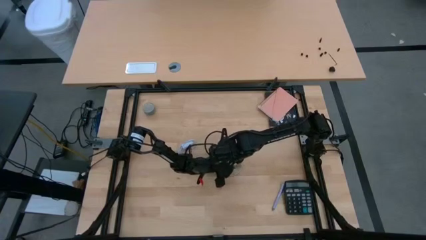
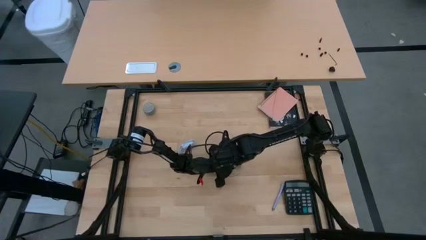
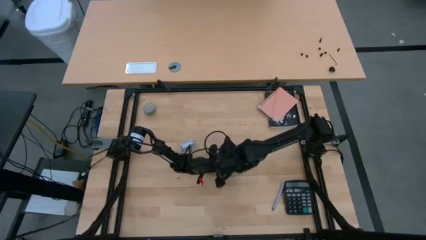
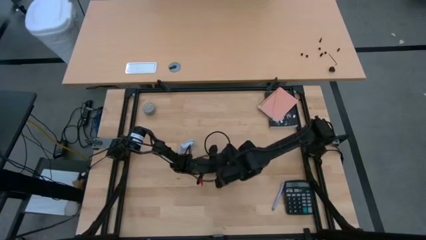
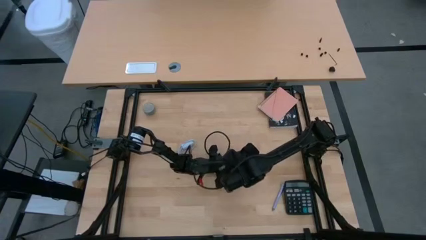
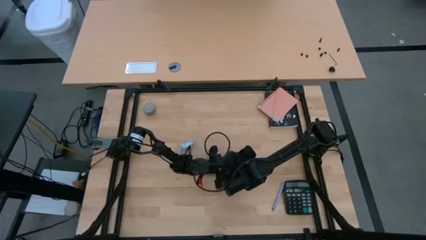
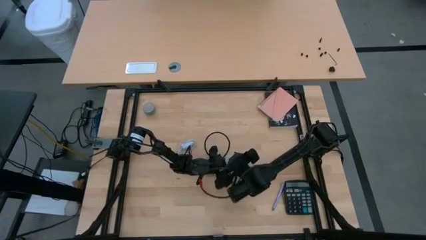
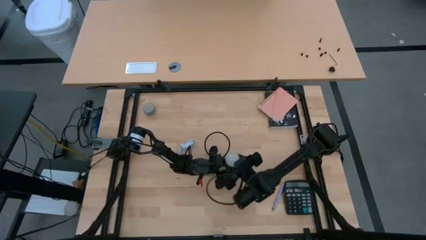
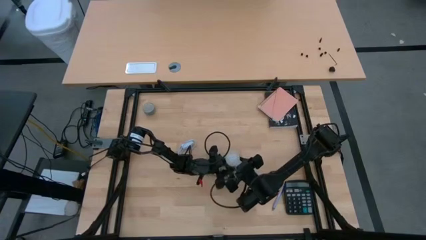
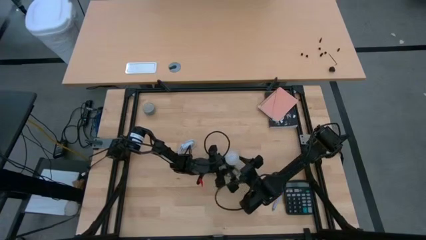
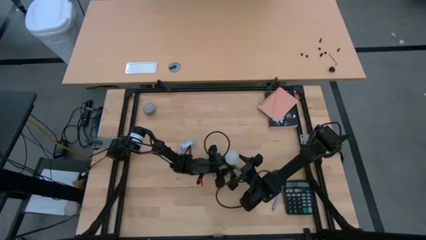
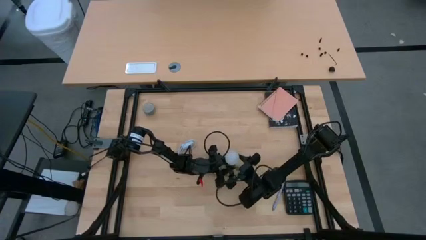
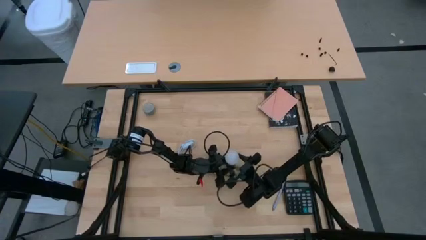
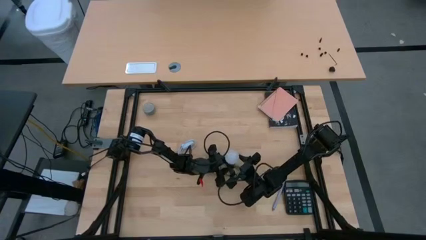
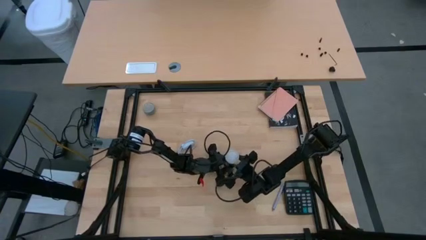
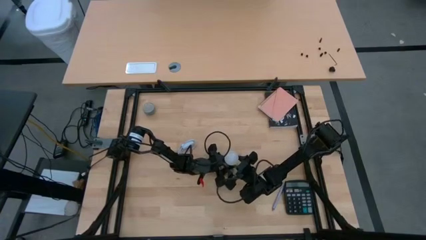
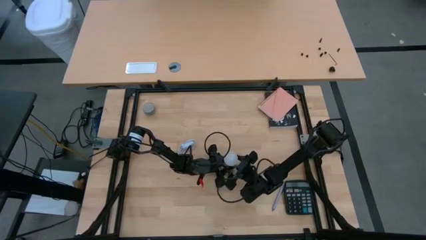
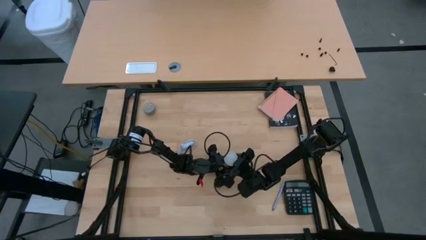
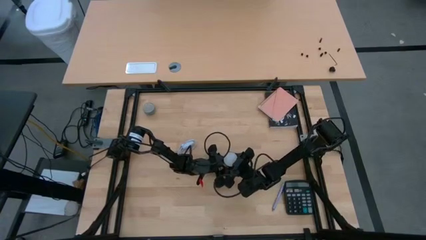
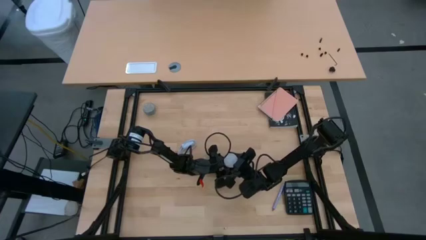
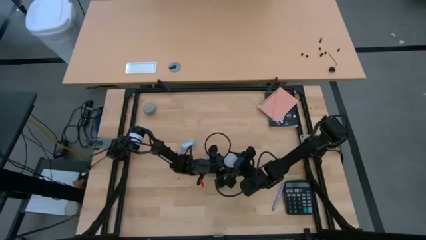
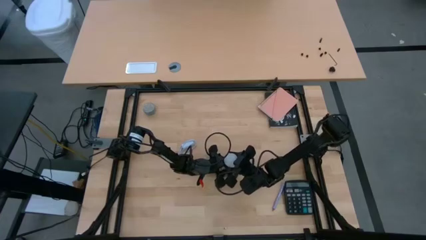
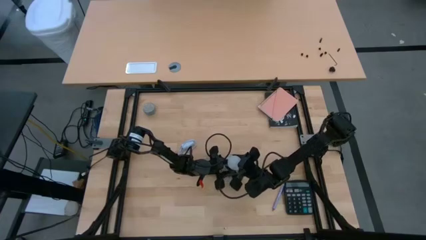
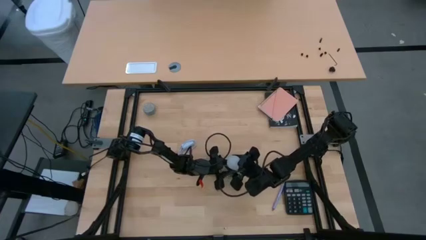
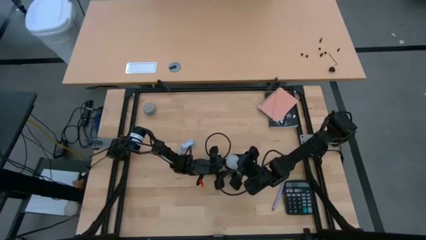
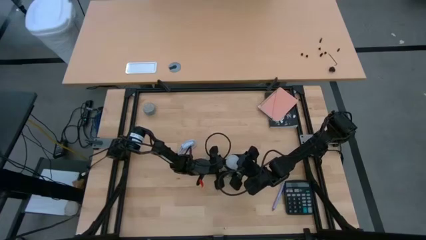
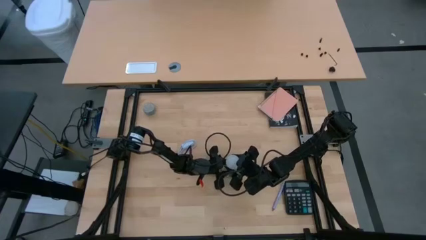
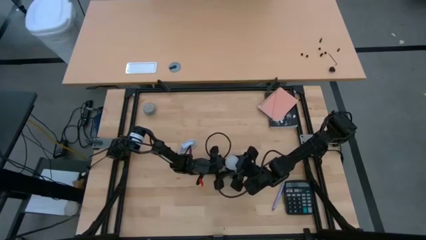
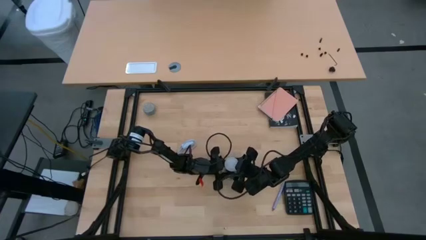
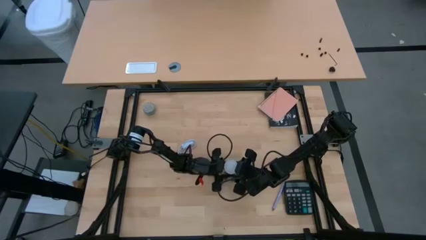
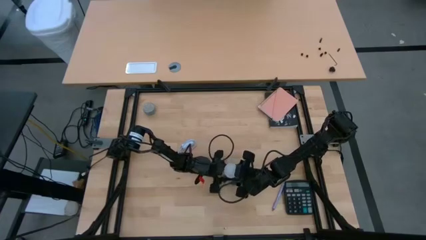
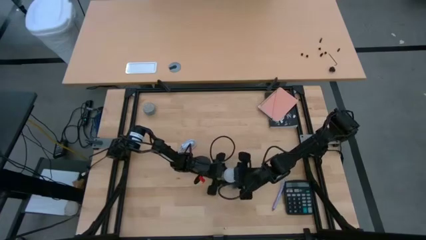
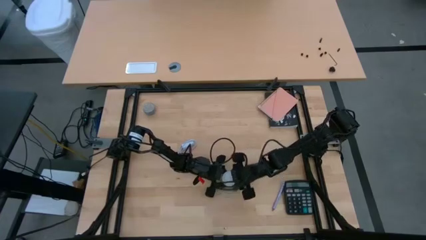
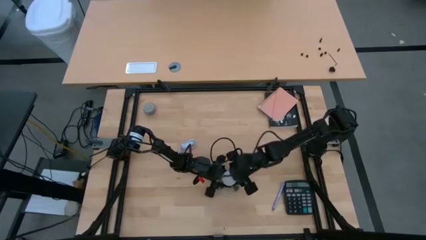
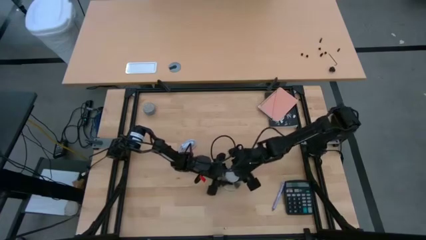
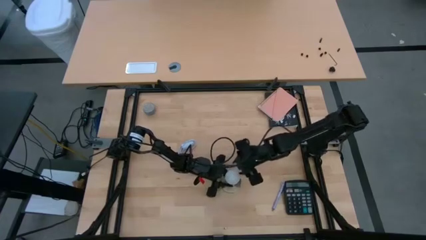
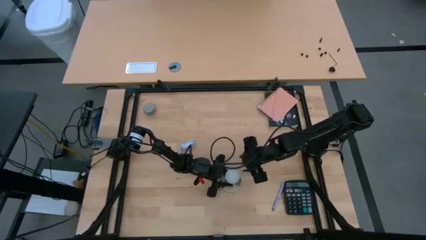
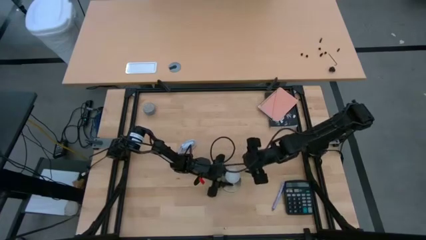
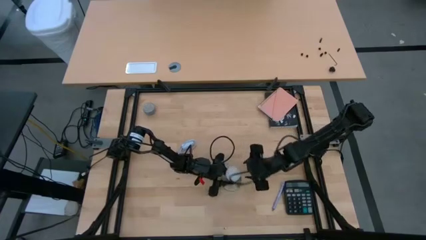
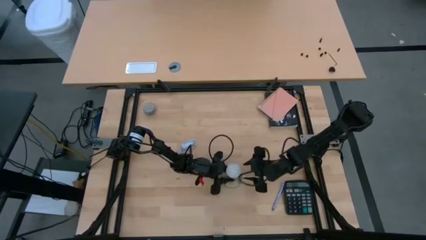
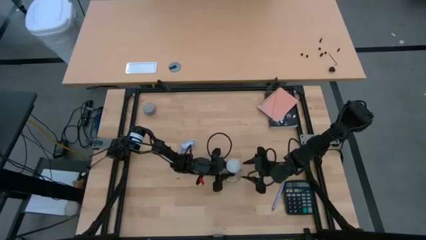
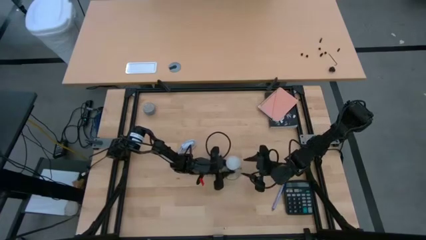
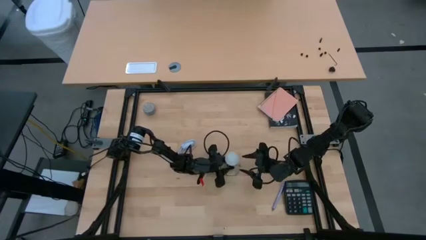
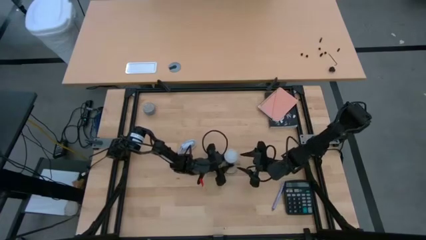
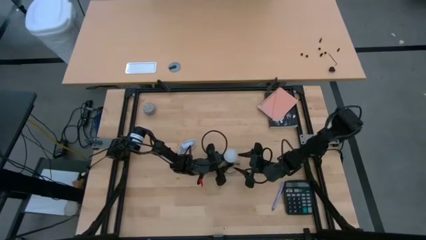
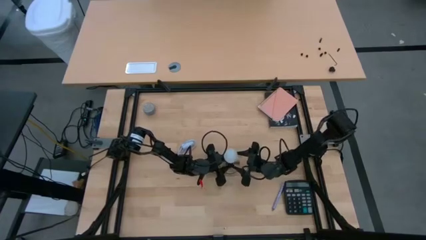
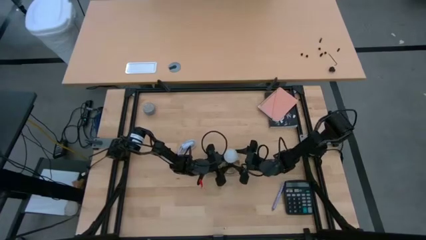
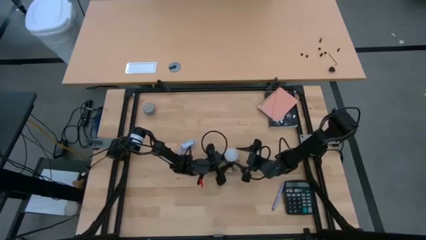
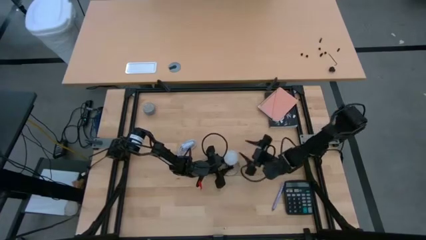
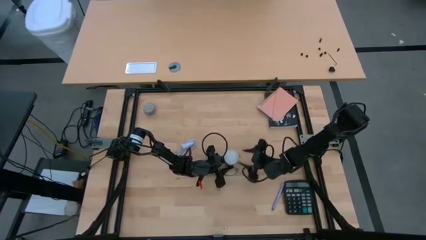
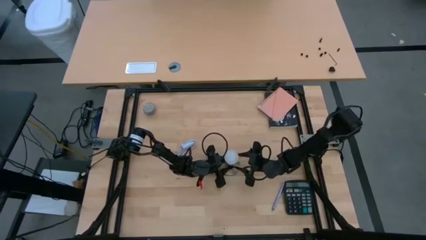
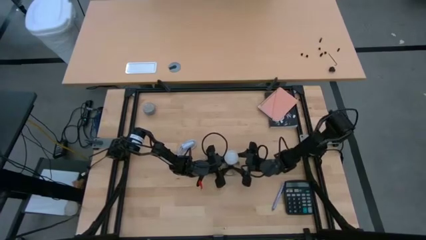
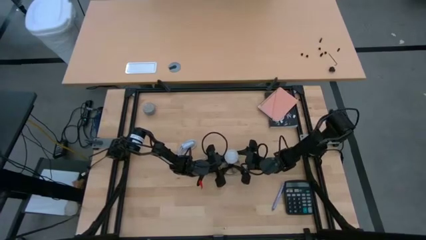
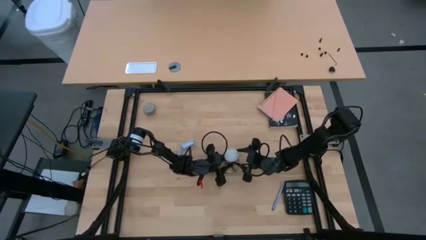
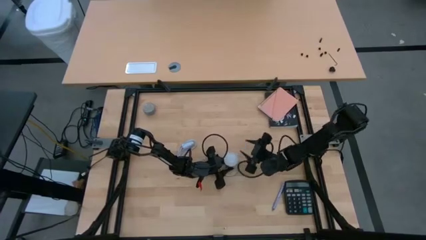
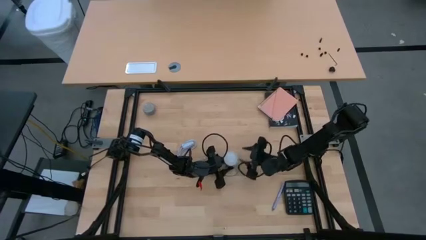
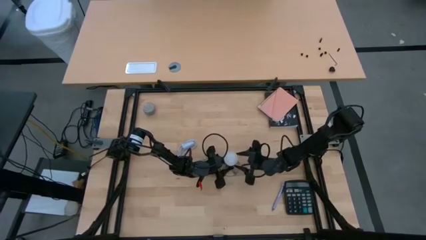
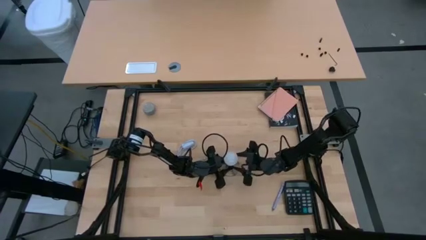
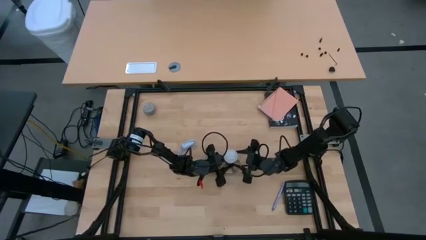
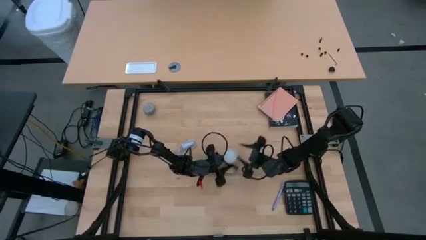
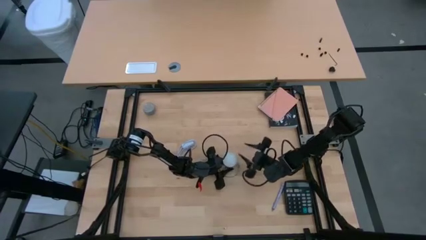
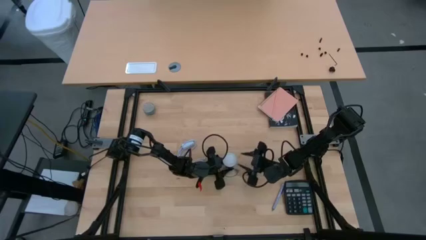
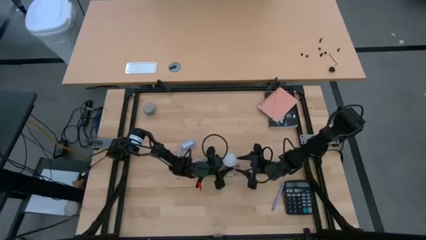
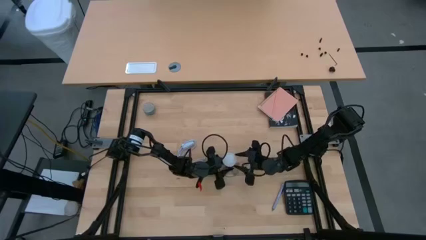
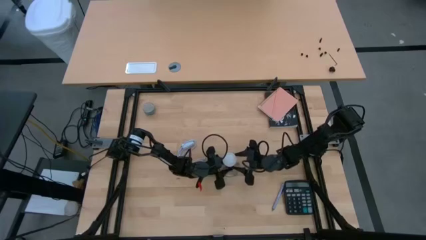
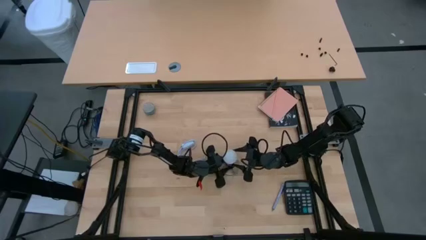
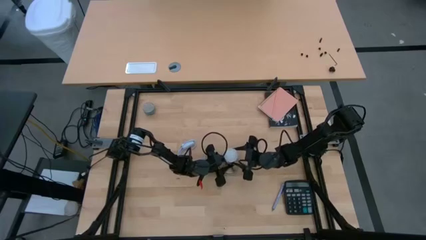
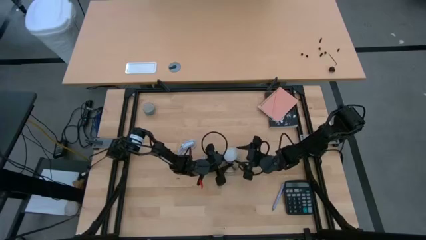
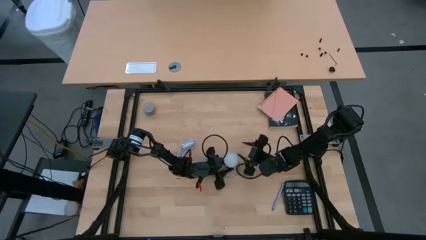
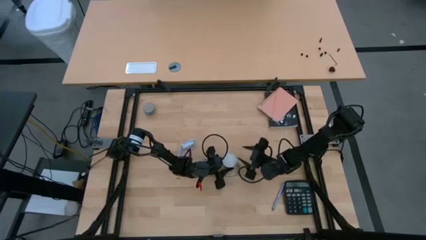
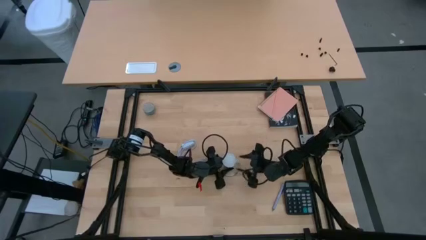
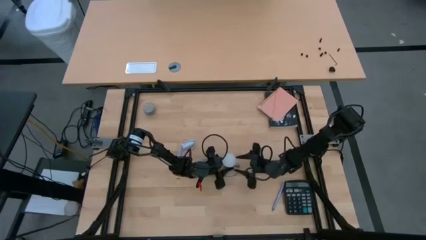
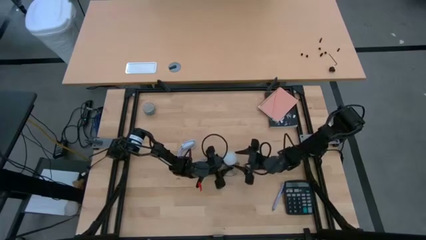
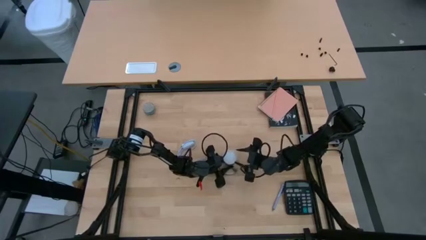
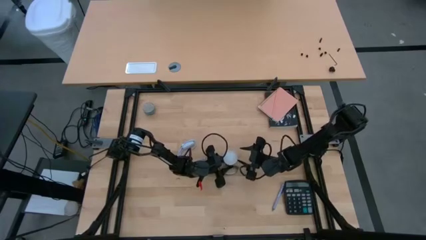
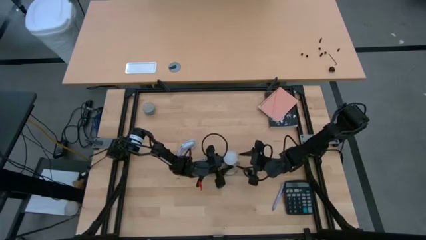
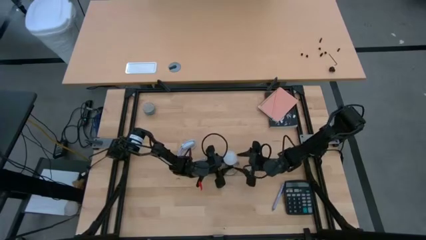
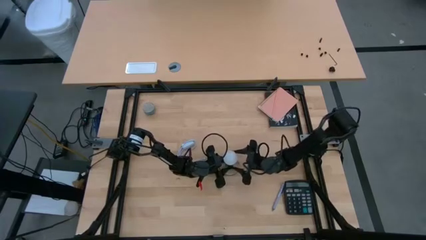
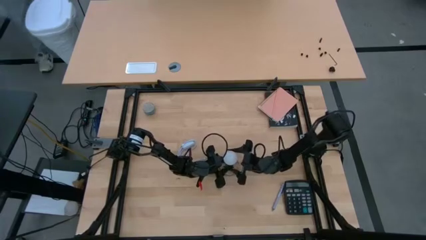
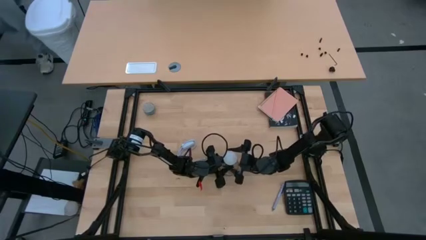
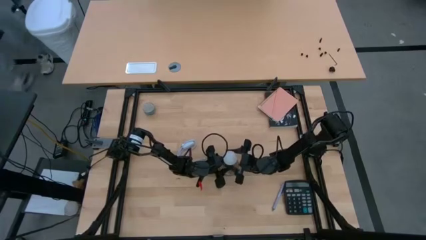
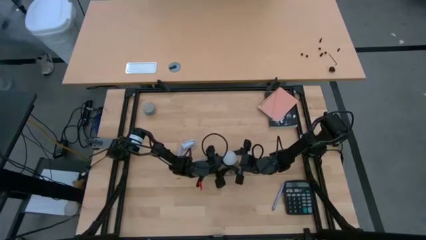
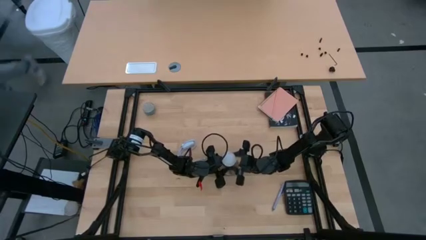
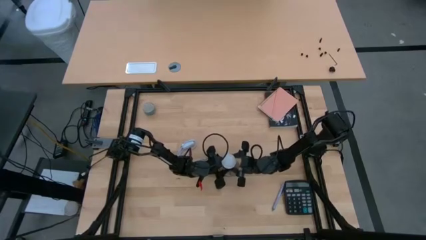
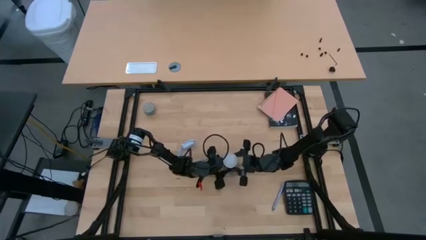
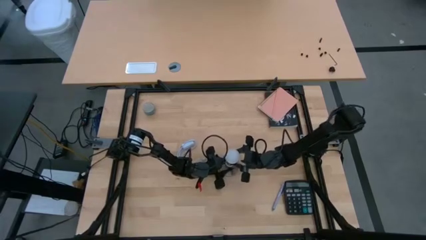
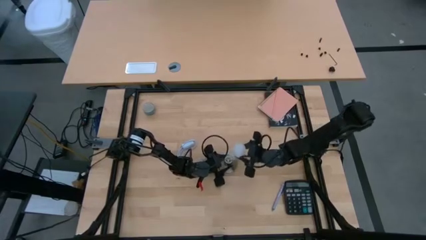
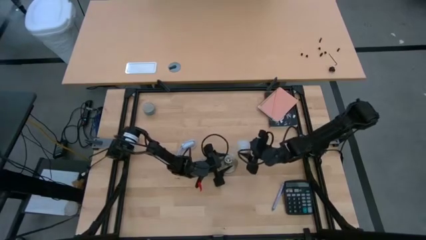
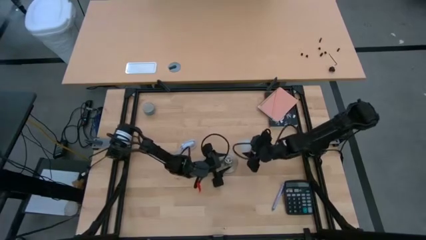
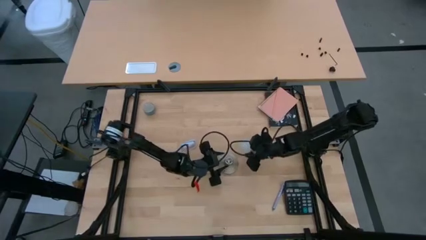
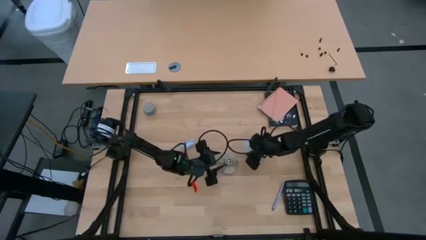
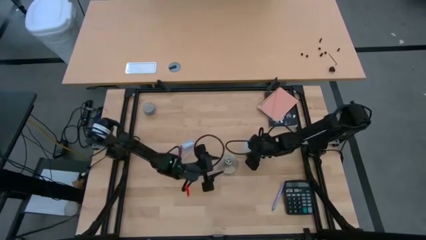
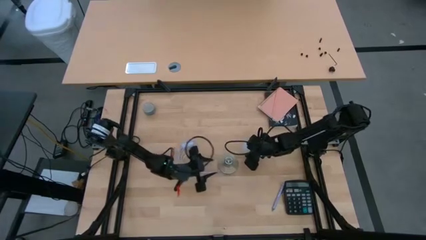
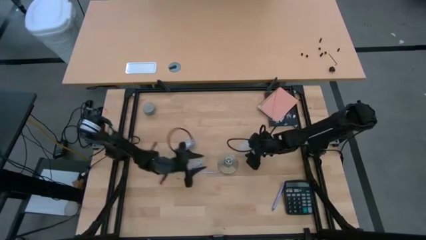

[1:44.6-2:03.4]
Task: Screw lightbulb
Remove the white lightbulb from the gold lamp
